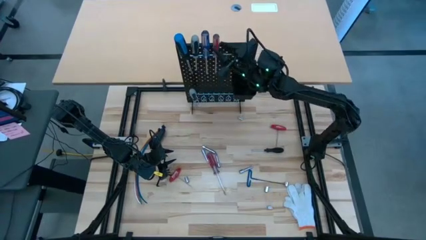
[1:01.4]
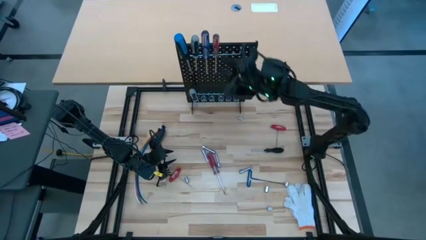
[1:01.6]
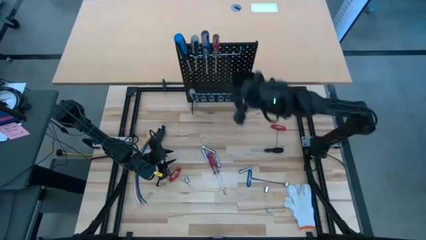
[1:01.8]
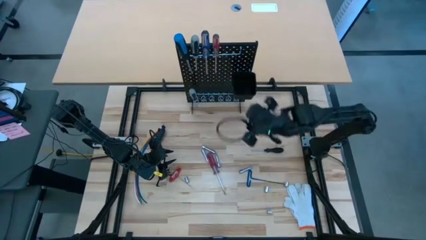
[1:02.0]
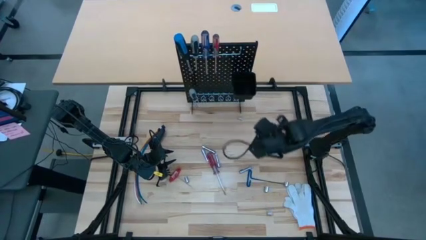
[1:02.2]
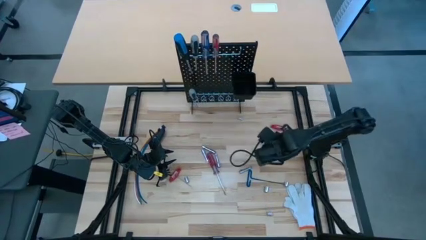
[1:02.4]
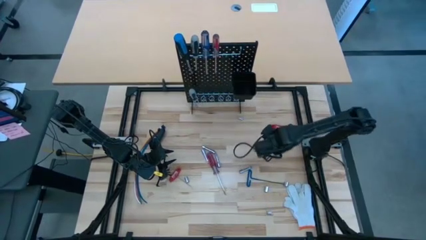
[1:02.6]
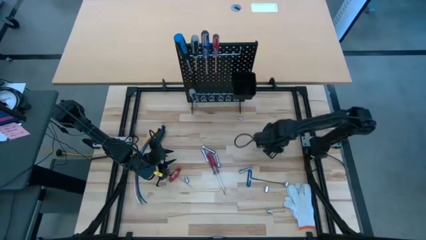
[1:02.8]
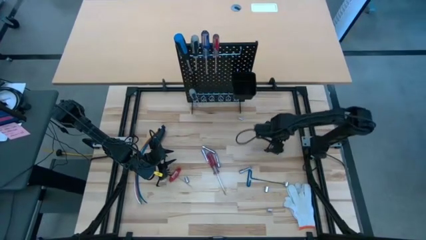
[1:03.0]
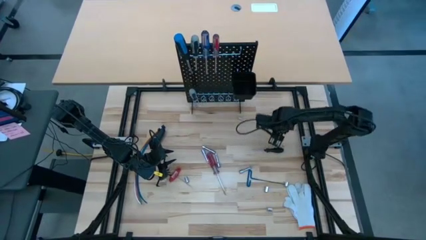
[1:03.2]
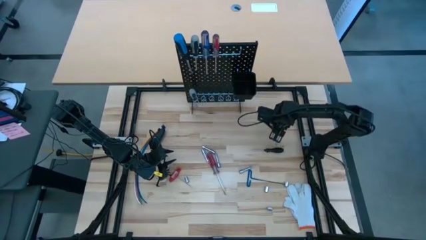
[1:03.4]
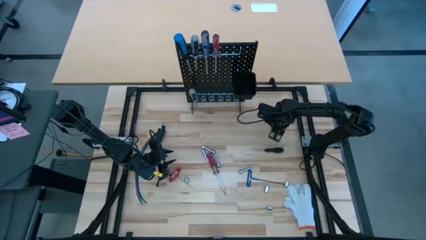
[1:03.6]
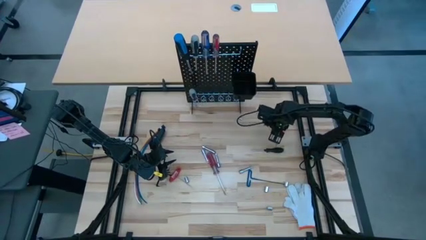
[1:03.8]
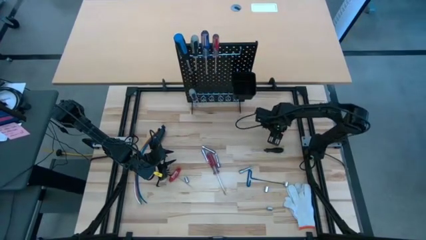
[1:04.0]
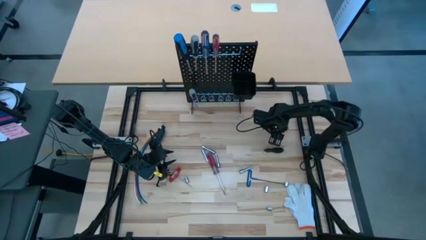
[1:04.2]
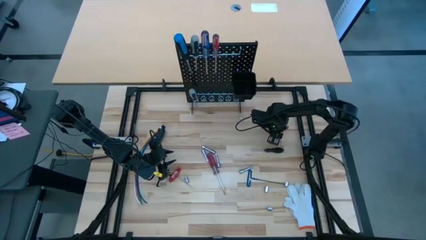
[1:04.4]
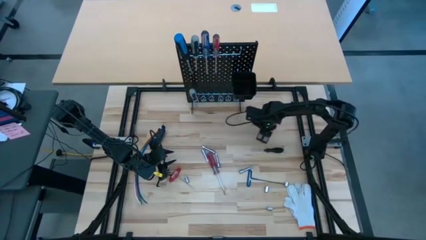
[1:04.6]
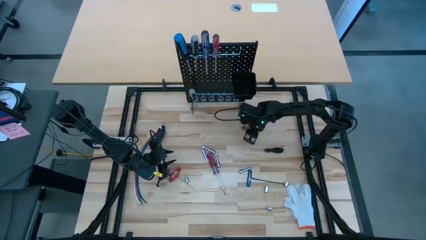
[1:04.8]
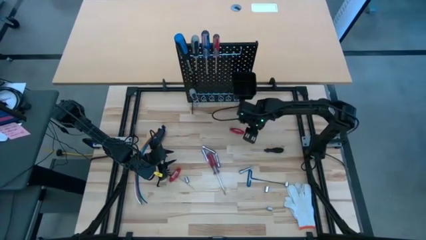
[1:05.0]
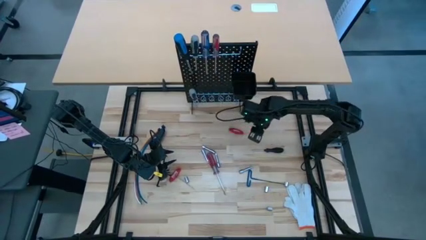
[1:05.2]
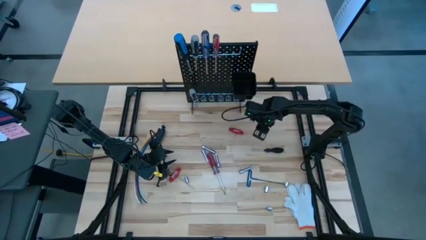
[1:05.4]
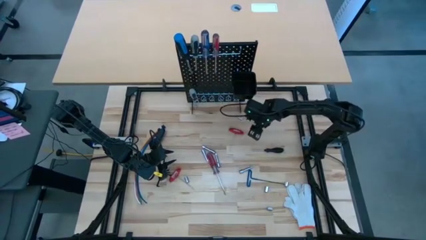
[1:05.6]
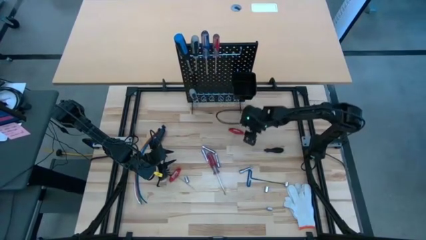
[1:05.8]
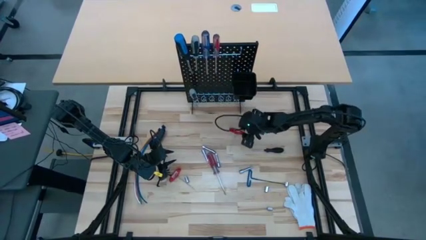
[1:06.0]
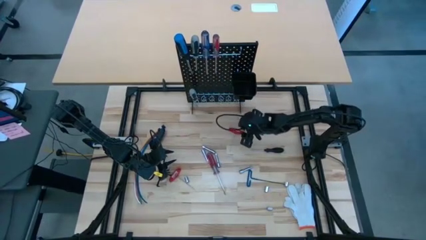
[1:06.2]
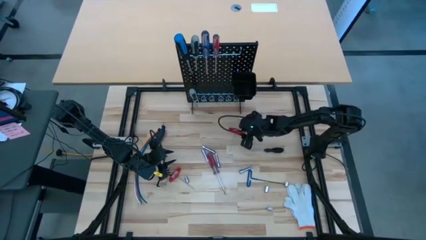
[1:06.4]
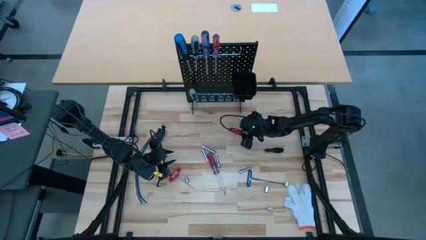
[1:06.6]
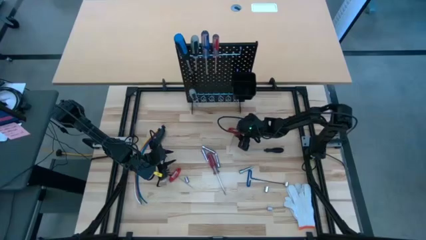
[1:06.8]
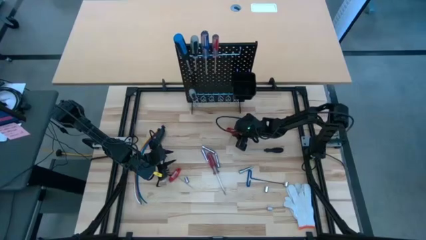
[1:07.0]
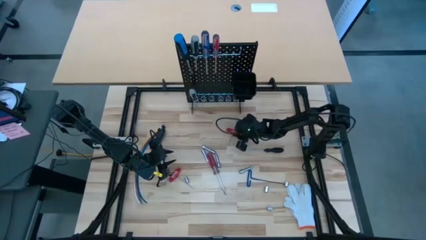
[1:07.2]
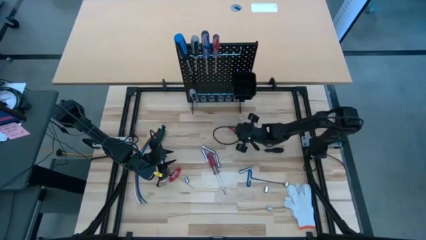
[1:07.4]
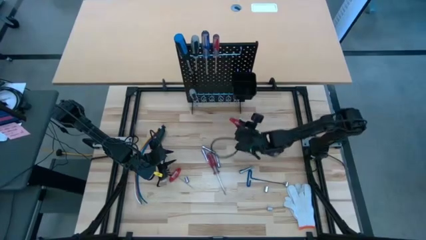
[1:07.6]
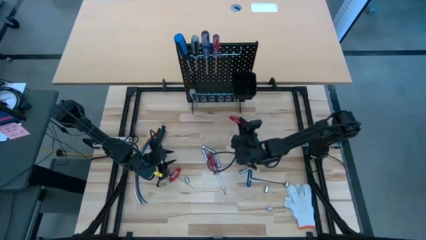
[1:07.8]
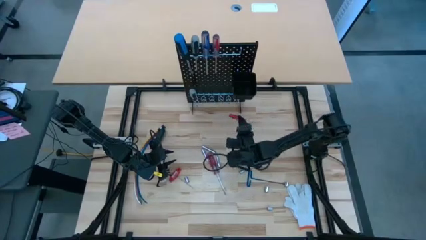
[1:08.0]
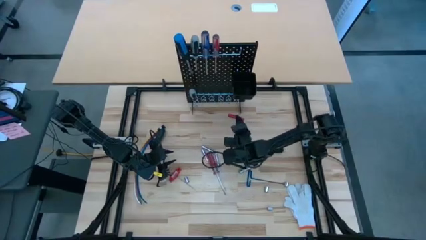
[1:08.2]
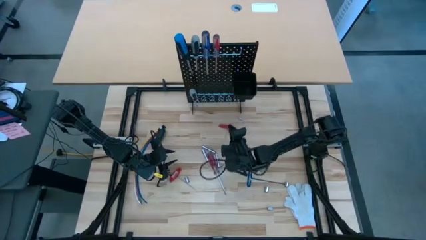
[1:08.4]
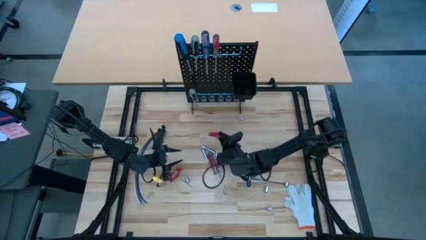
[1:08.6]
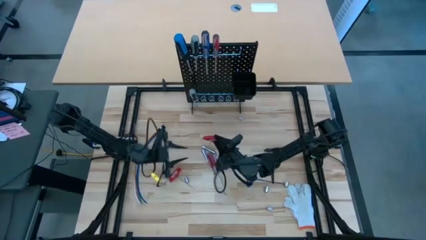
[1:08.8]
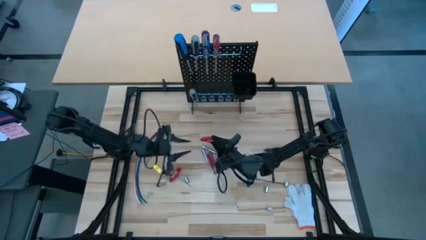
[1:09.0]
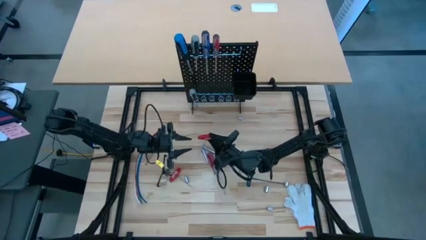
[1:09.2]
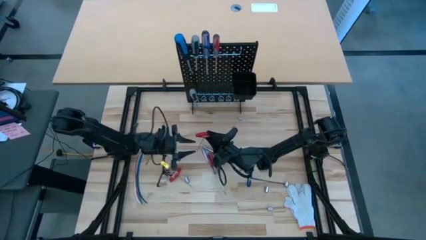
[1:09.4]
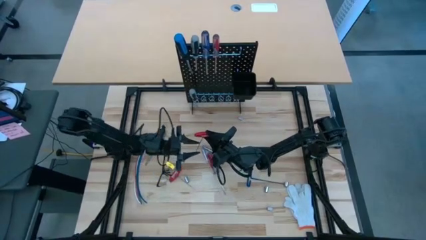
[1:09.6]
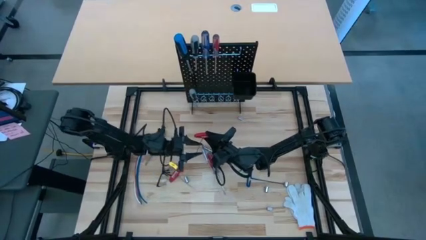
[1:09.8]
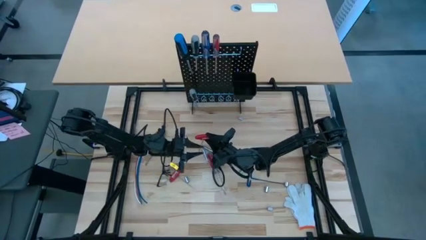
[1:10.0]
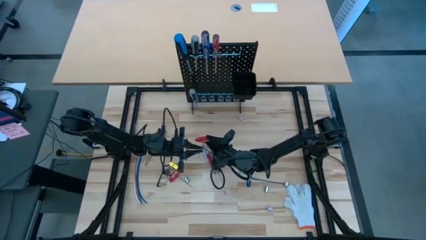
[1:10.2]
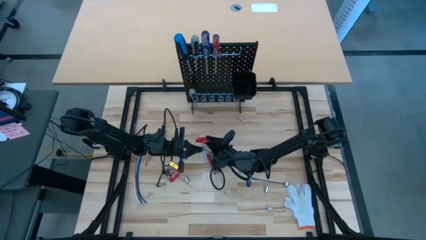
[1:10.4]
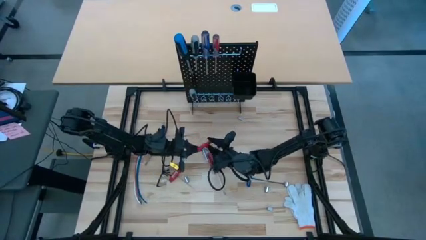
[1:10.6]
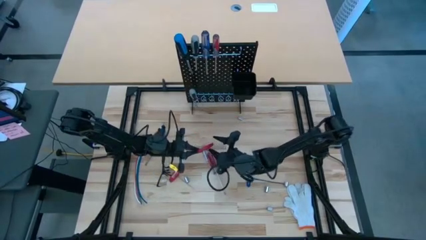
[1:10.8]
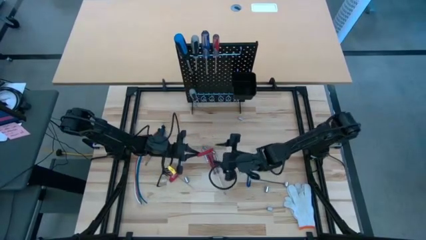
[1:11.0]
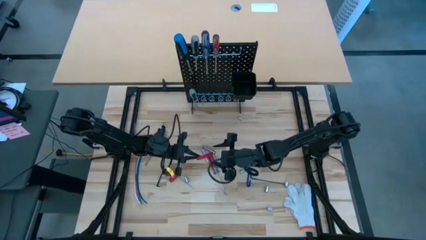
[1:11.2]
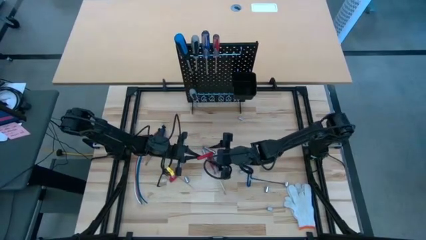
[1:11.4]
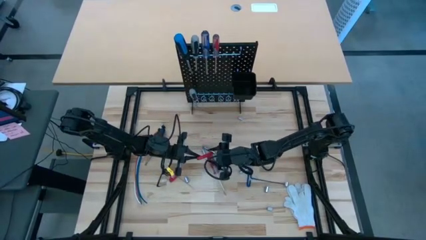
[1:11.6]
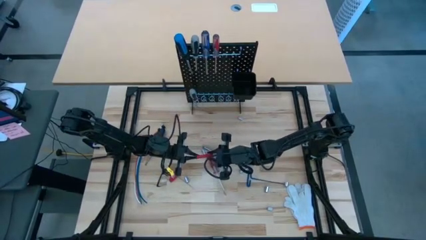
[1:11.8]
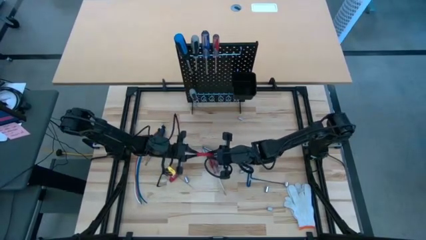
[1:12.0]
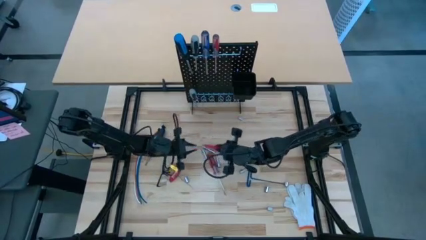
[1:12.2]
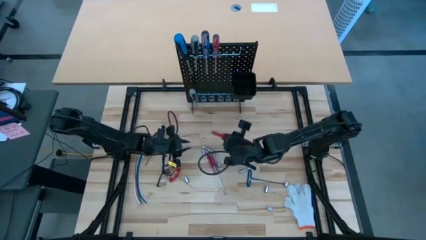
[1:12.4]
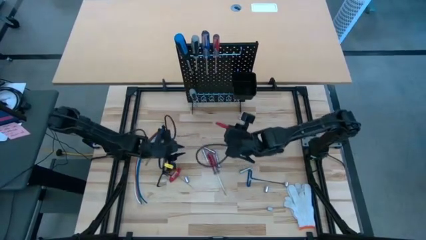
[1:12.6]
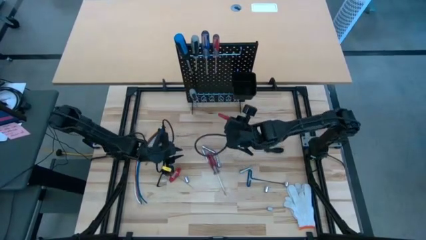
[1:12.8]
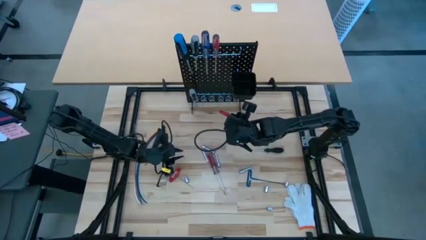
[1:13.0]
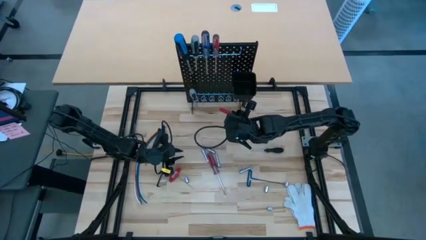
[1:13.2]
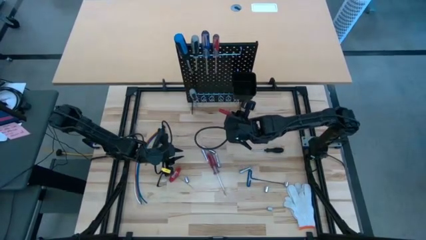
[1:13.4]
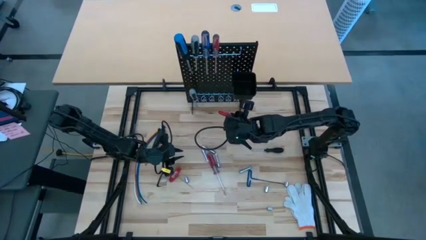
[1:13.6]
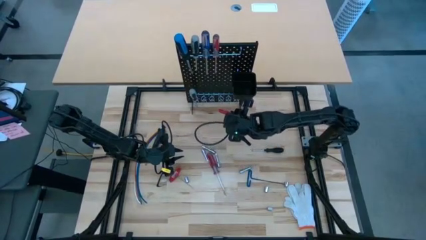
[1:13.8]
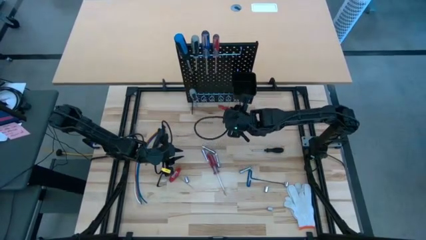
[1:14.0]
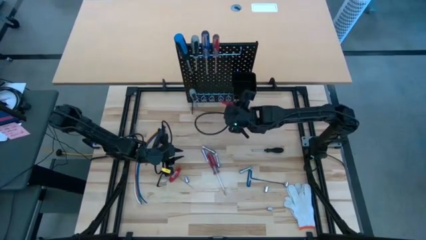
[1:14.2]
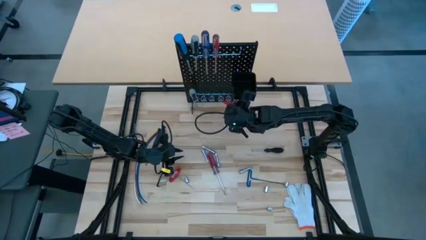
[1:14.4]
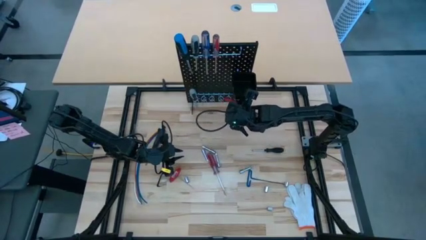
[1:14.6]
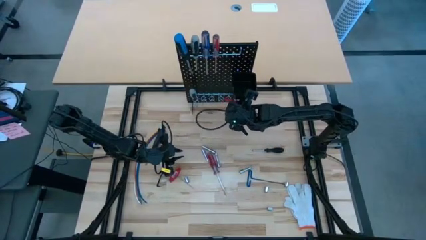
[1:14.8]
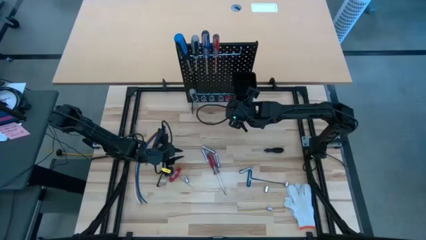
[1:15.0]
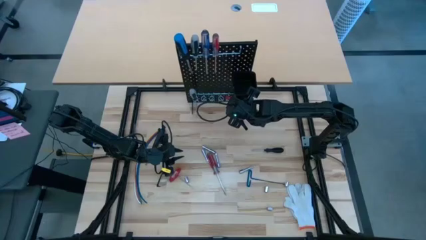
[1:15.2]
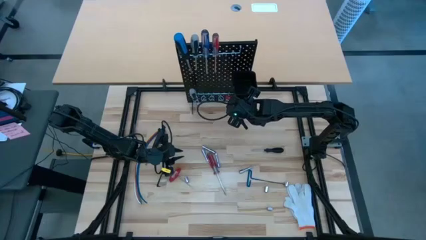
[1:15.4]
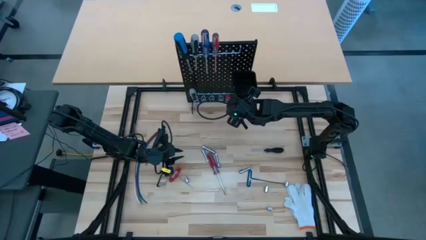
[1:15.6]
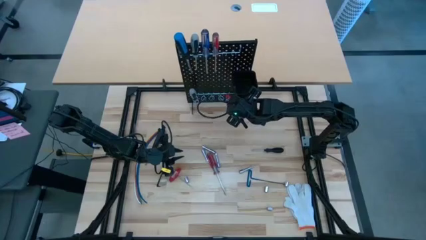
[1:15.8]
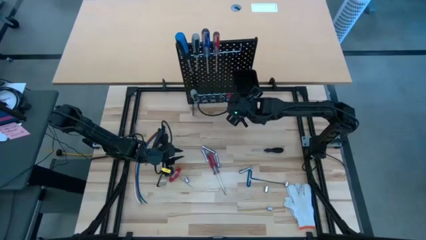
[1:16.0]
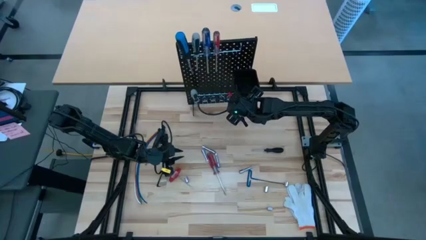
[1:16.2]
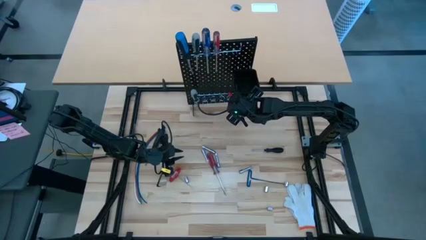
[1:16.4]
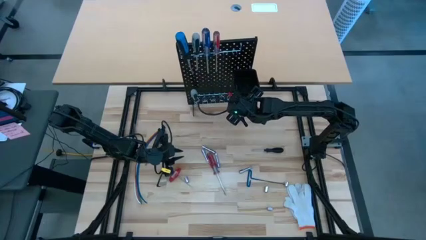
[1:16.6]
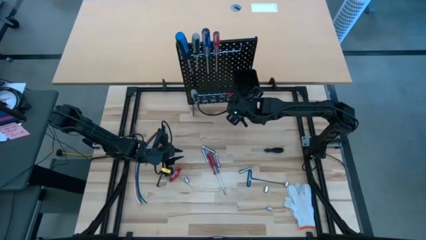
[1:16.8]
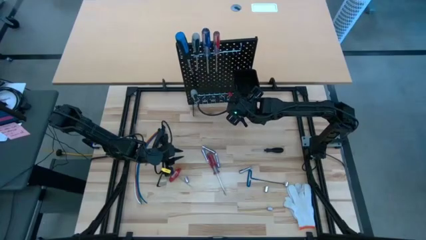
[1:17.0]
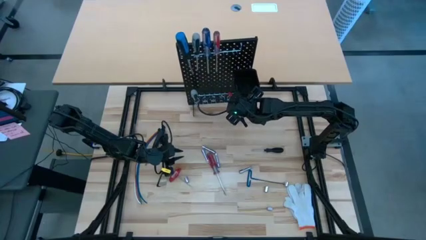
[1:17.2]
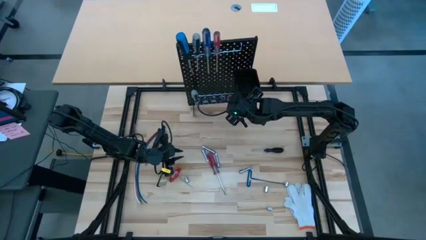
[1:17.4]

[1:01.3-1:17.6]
Task: Hang tools onto peg board
Hang the allen wrench on the pegboard
